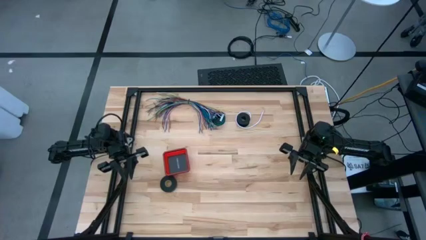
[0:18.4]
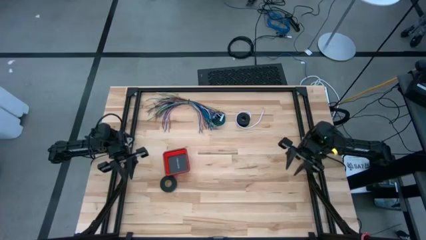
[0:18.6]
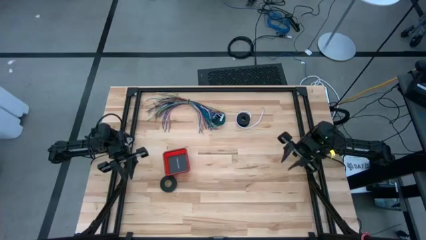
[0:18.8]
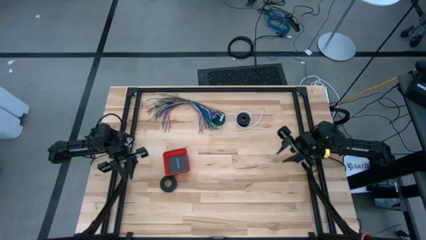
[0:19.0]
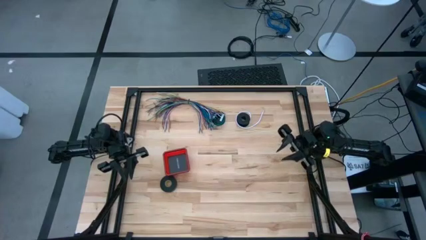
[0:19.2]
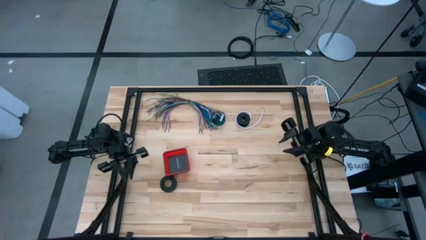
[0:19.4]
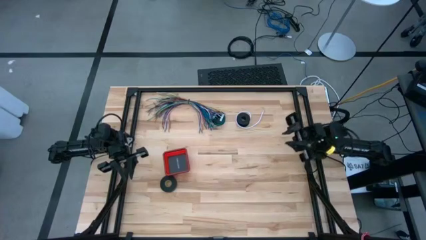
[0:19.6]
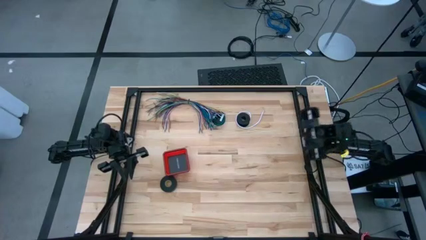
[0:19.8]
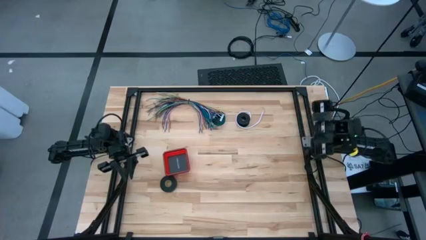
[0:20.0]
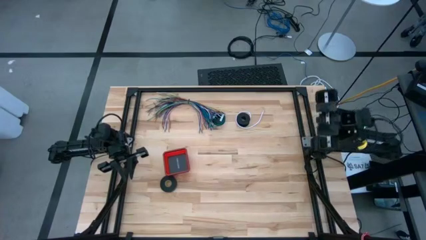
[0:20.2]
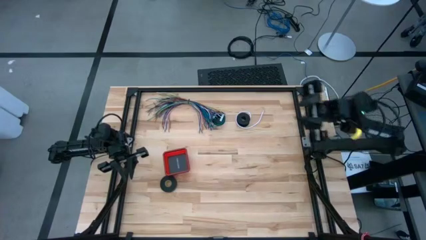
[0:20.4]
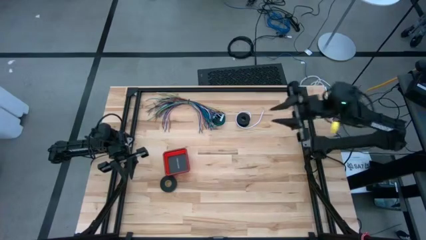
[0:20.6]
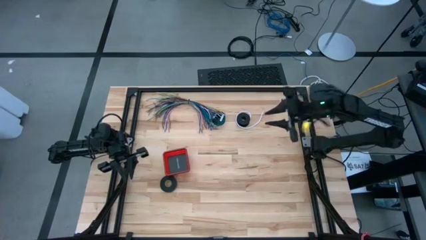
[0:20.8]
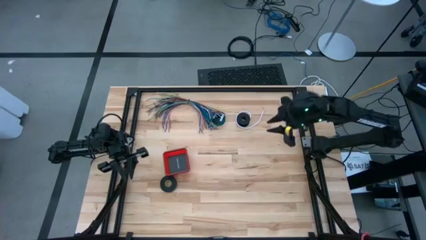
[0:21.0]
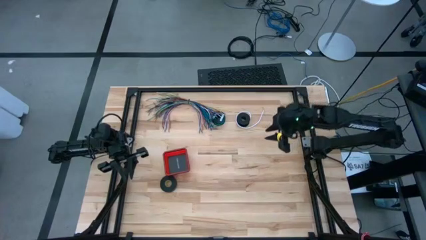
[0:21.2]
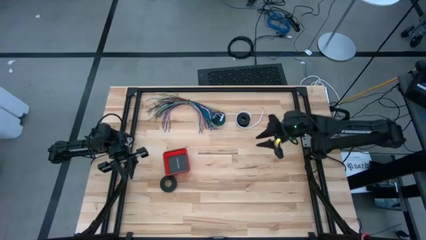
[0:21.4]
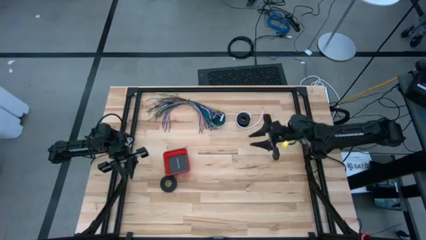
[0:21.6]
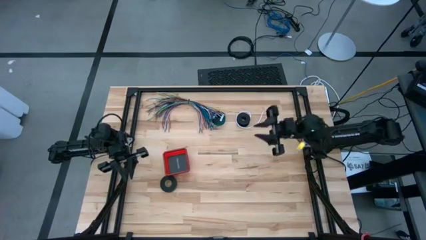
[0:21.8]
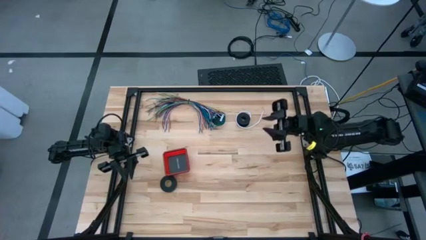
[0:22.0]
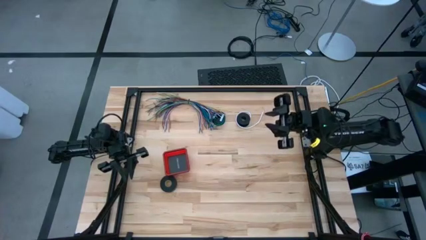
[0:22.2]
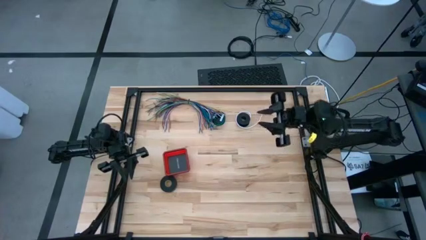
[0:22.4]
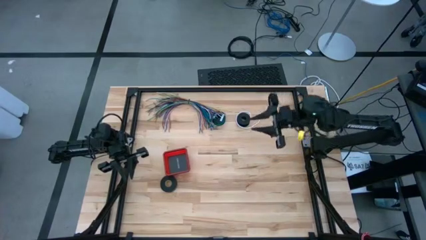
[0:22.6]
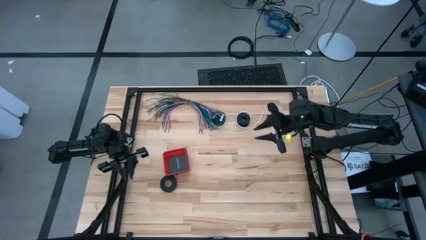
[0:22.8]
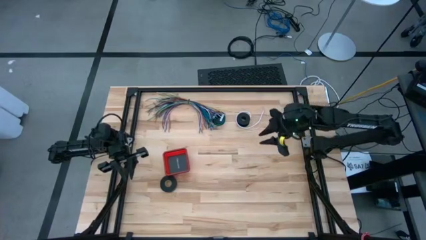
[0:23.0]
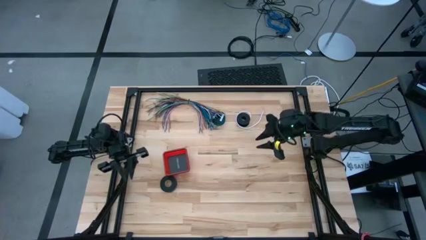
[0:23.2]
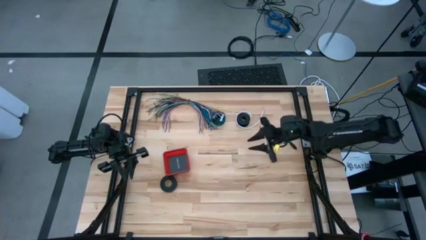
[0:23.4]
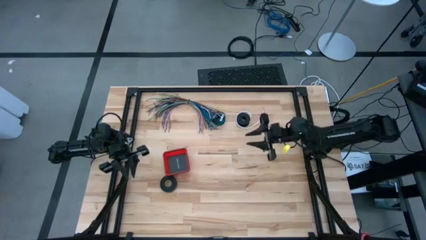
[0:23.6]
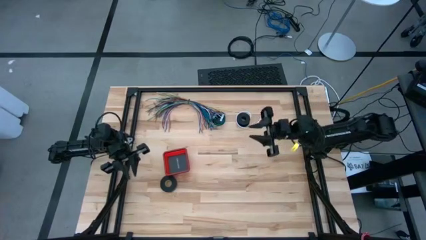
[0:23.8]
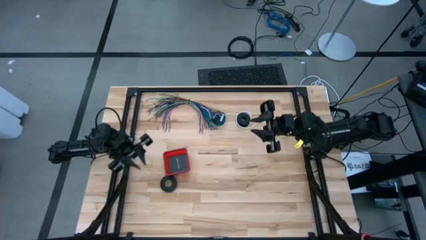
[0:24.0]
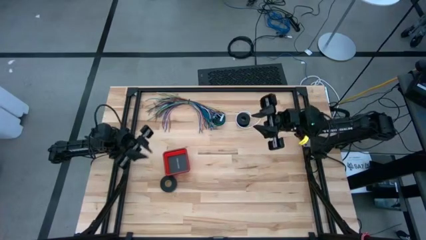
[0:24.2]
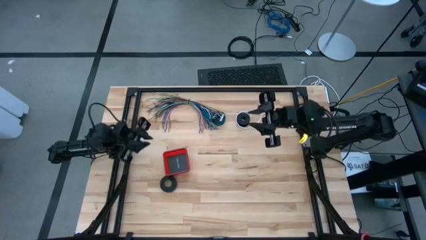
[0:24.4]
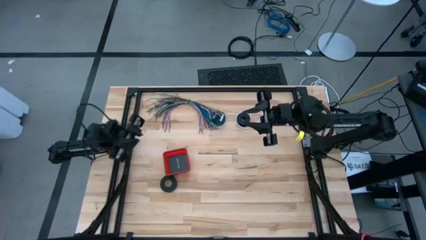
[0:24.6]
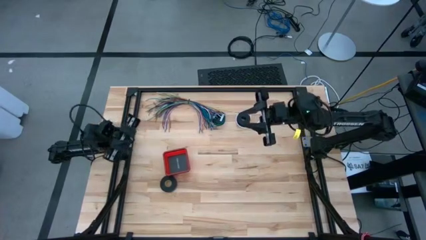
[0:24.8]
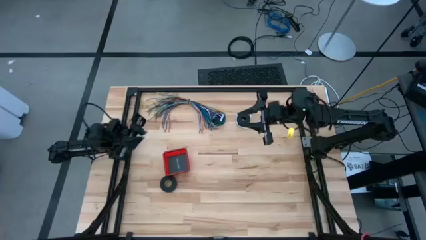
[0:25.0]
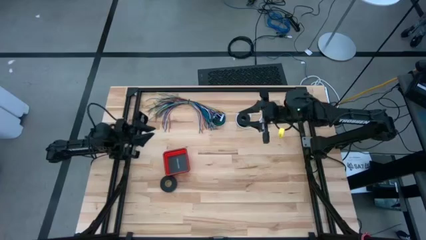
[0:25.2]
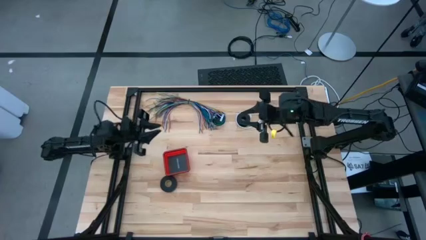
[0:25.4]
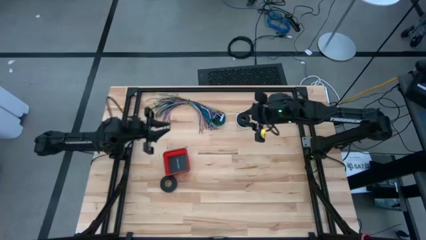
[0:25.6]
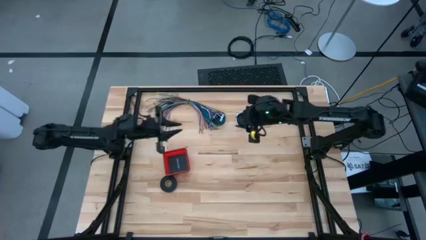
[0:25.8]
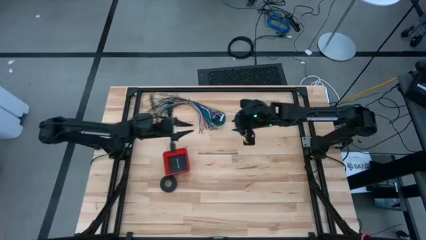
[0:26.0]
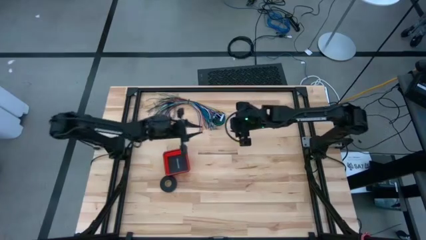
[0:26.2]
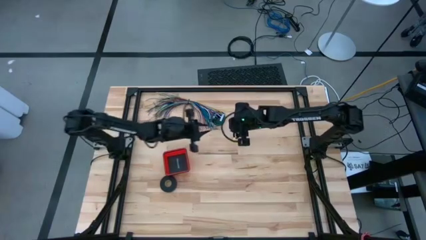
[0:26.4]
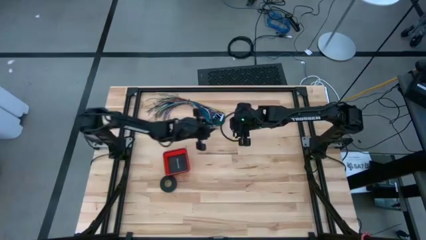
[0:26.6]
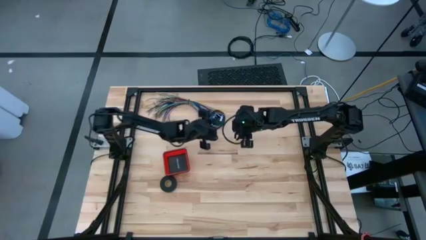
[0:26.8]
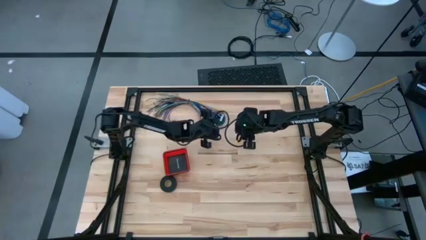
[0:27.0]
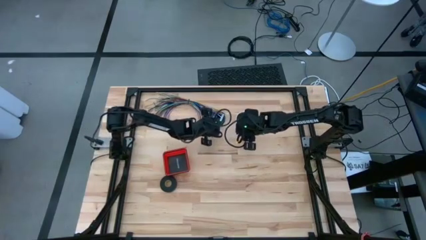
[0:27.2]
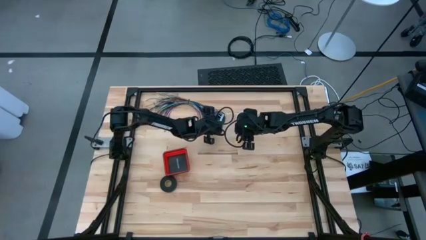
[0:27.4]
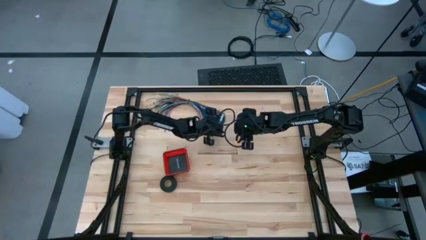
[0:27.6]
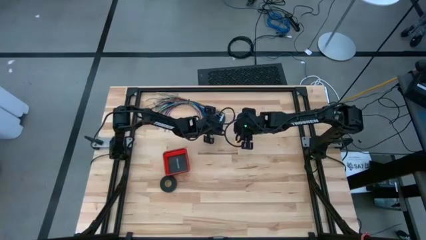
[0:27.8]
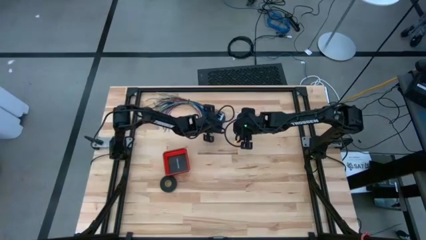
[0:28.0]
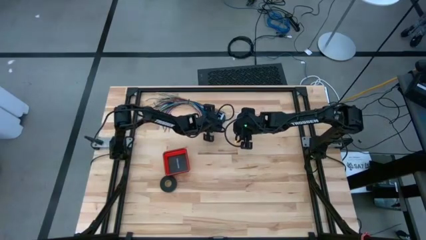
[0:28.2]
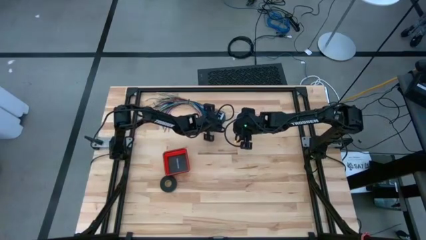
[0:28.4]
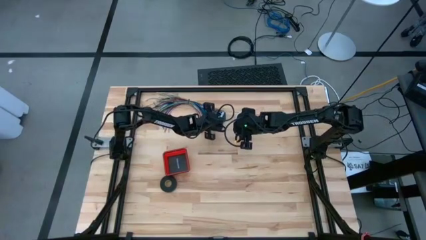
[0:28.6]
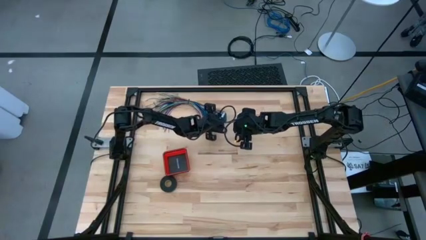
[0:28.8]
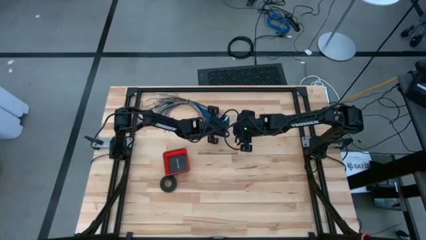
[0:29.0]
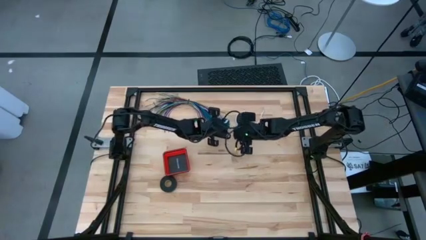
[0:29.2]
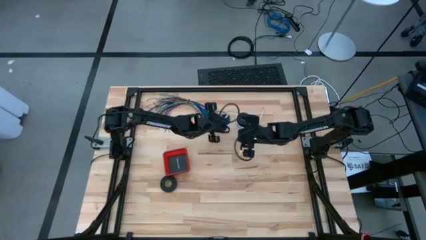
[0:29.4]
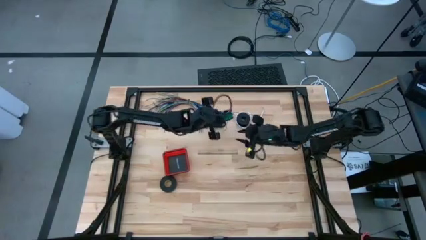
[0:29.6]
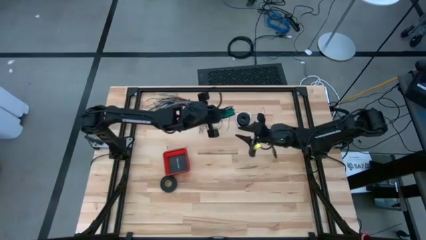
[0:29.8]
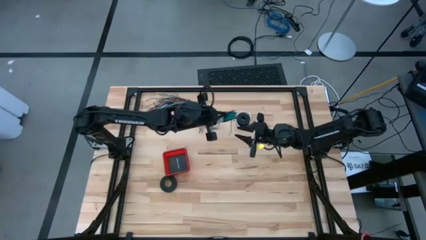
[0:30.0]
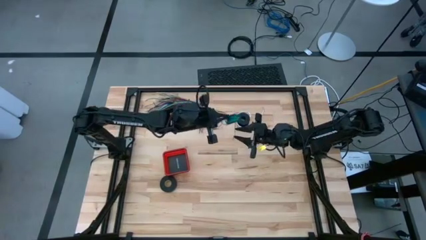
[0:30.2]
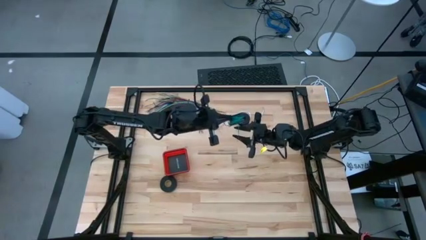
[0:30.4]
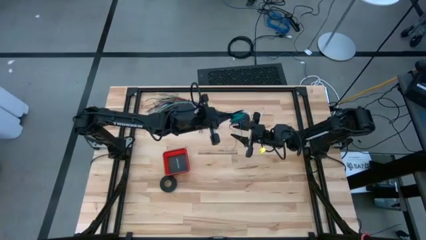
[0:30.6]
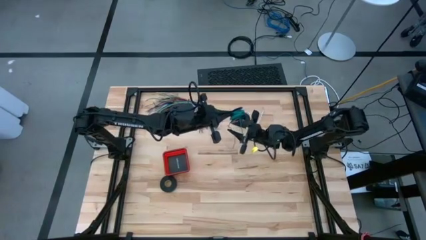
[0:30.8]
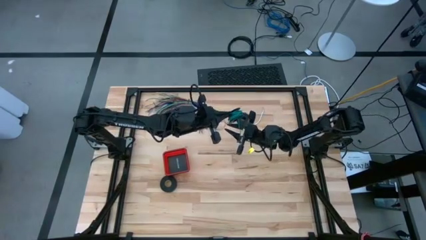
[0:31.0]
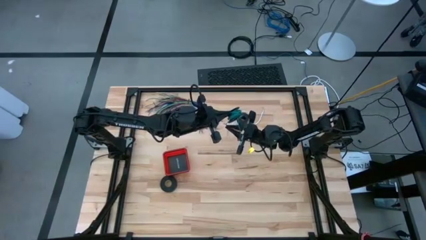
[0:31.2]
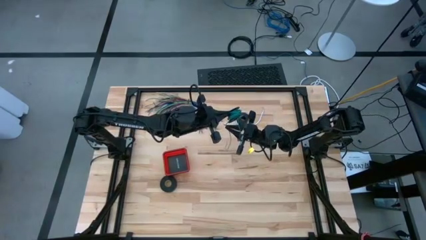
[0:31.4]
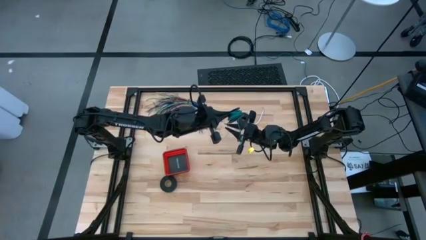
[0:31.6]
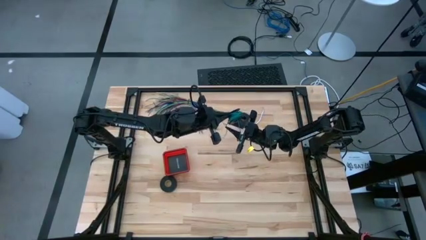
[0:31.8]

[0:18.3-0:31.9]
Task: Coil cords
Uncoil the green wire from the spool
